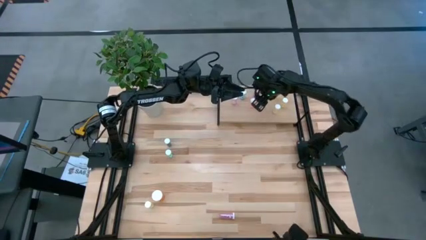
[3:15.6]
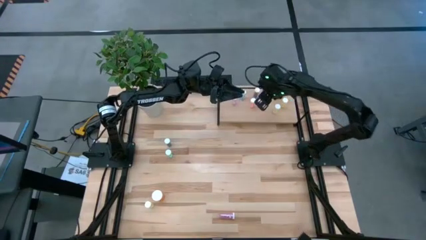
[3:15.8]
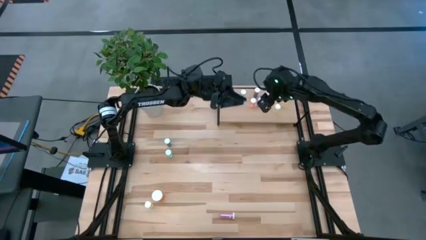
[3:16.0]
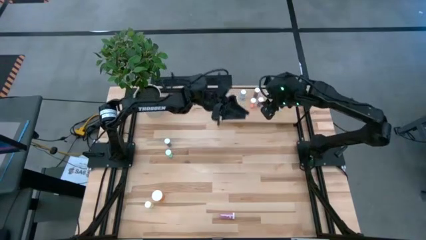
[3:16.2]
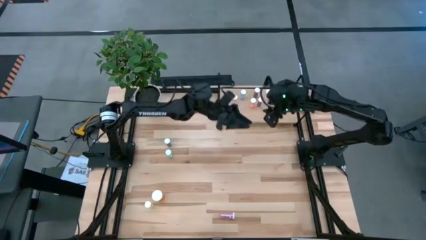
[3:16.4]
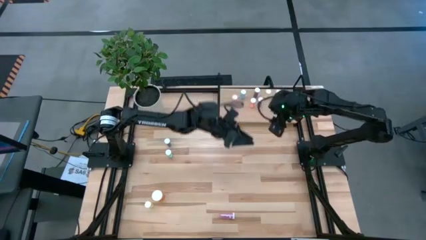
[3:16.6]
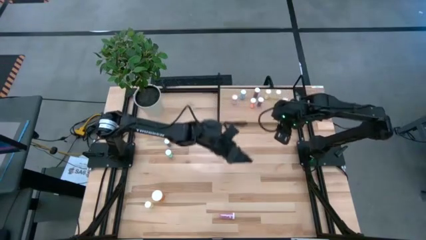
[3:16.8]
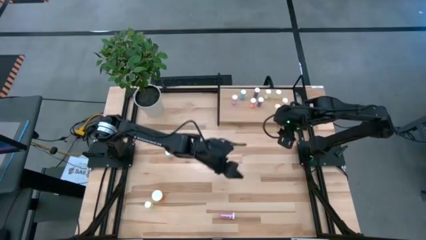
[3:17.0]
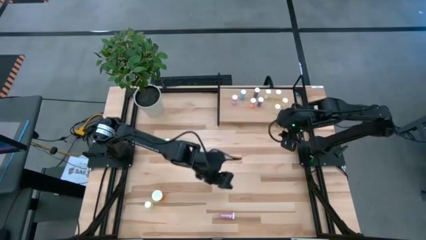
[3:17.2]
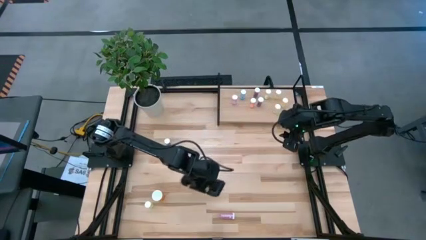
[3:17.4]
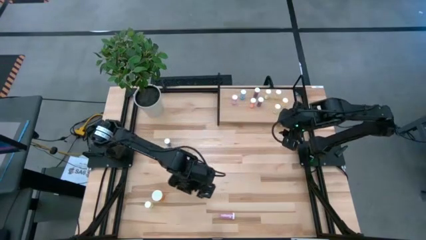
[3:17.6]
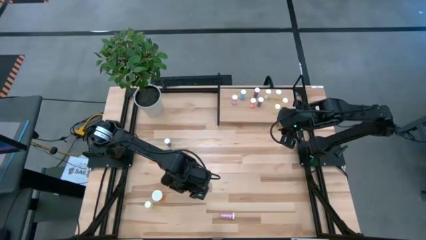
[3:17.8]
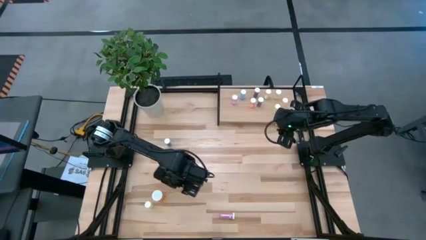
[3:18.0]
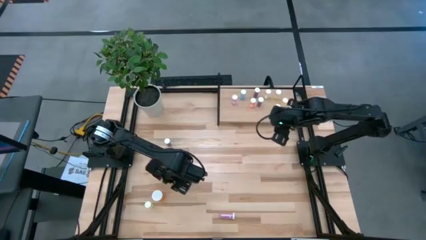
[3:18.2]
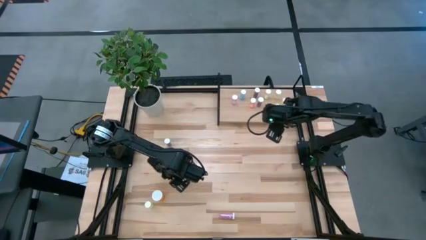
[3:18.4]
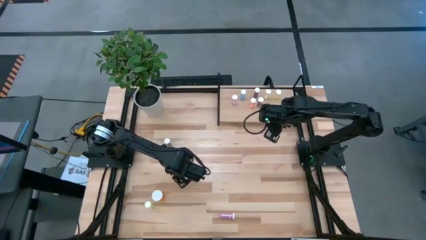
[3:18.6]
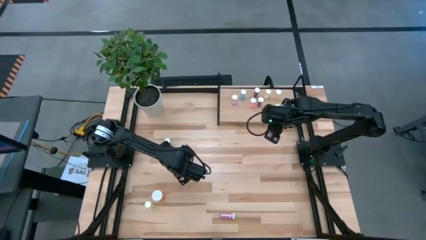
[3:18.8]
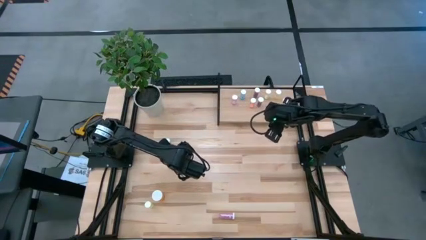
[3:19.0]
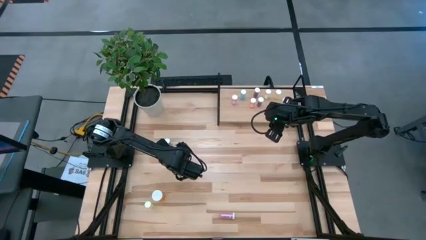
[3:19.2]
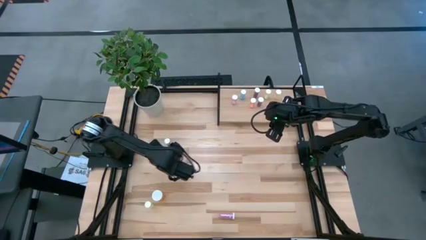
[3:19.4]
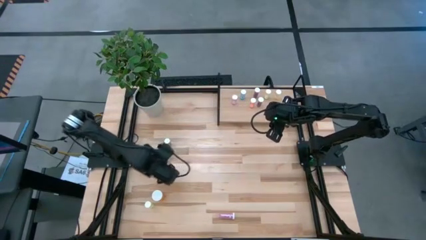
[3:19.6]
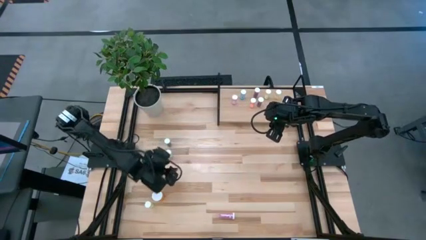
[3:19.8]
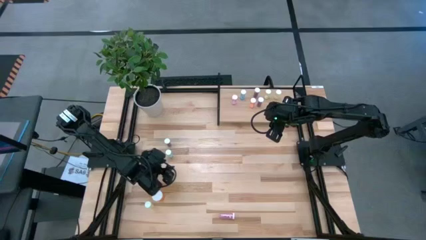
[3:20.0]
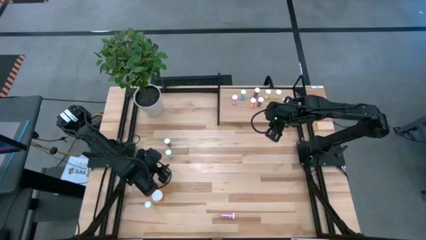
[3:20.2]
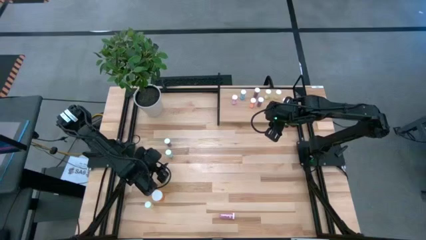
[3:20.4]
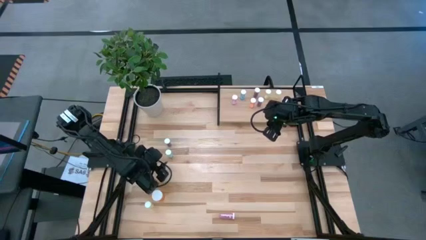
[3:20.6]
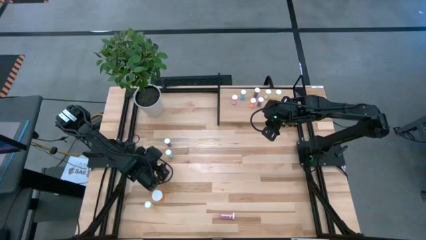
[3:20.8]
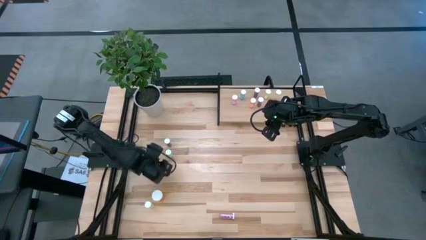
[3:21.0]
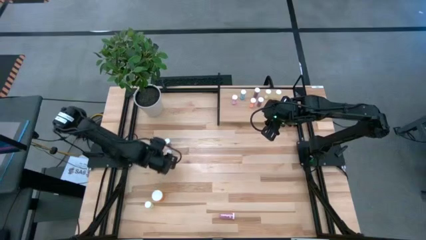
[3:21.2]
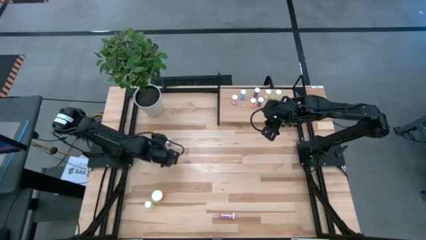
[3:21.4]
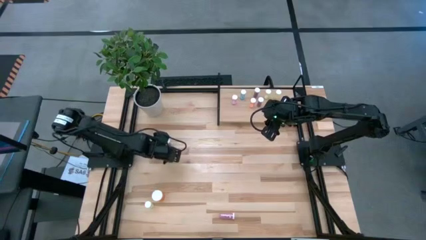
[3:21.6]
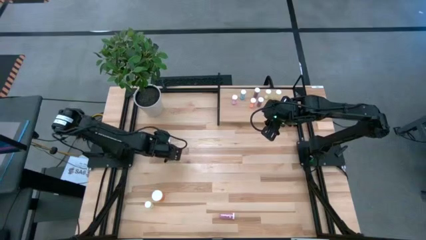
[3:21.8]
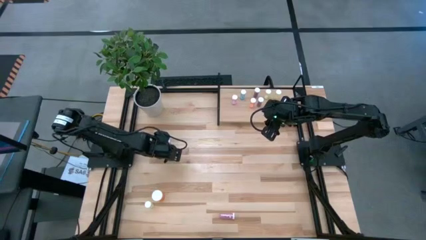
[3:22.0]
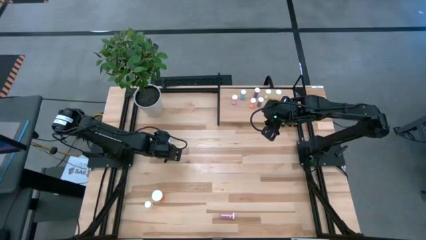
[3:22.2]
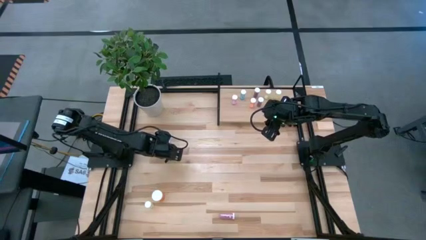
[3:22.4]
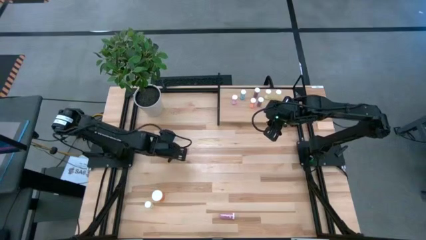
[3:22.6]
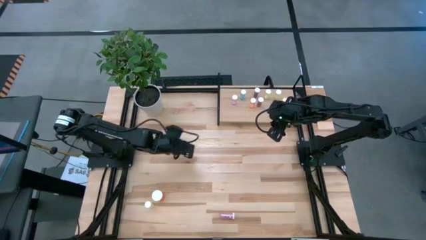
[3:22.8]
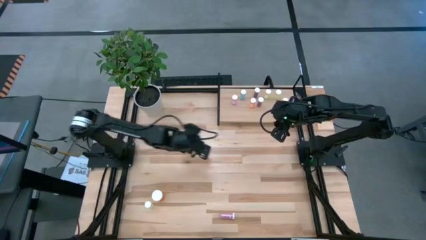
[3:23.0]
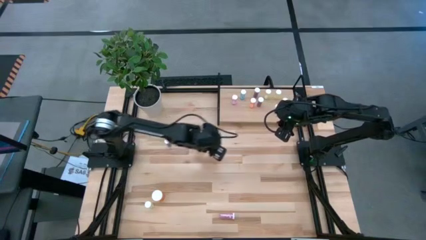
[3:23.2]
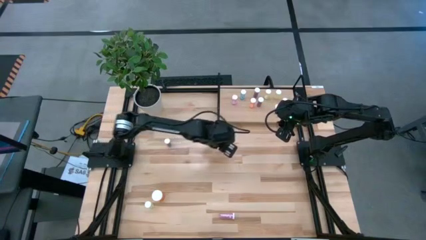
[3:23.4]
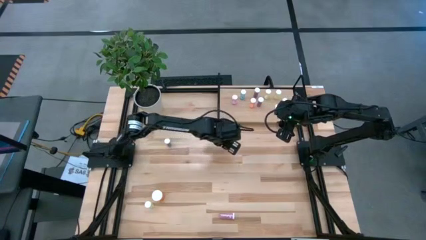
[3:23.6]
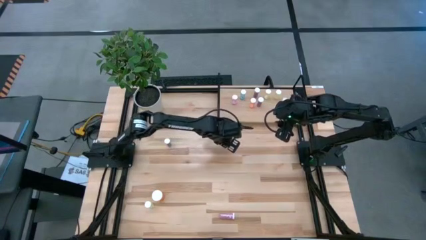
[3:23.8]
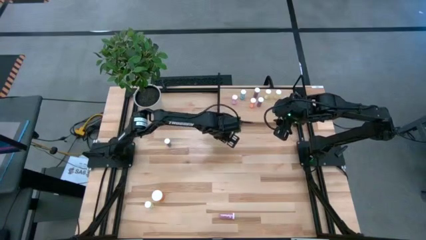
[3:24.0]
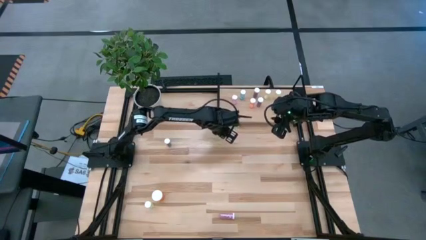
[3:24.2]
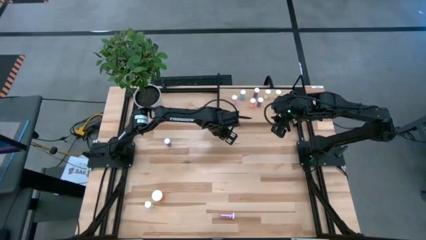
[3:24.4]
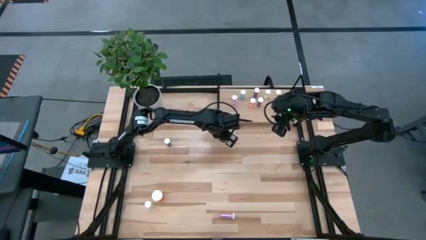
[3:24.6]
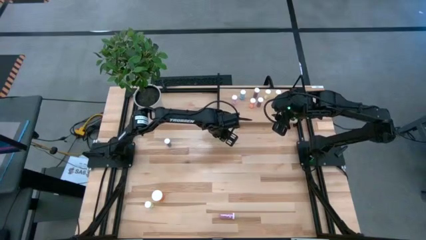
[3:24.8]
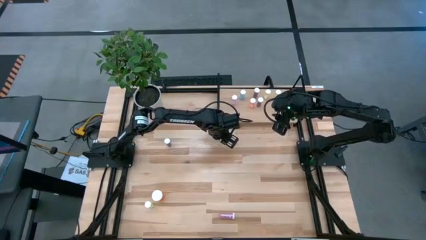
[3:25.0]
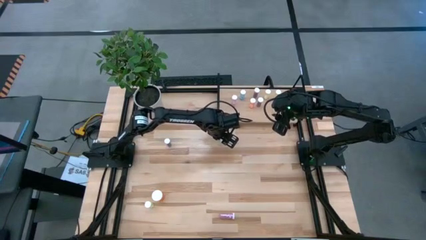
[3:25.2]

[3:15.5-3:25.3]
Task: Pick and place medicine bottles onto shelf by color
Move the blue pill bottle to the center of the table

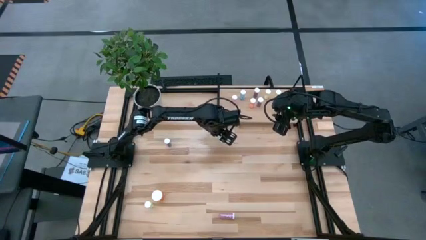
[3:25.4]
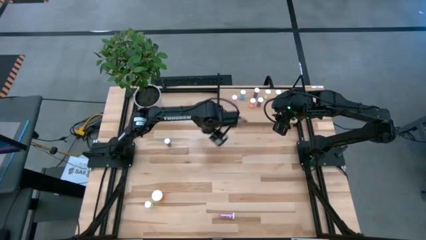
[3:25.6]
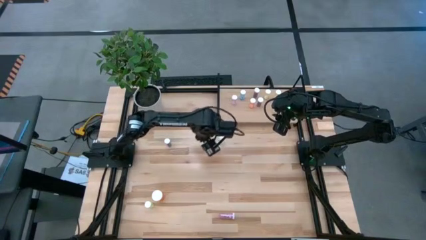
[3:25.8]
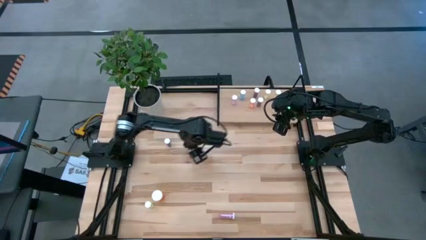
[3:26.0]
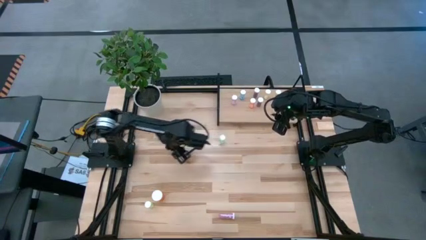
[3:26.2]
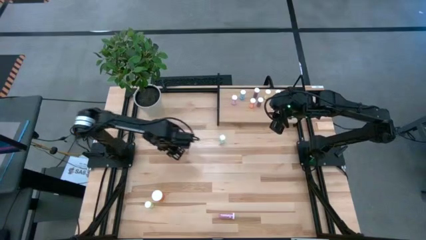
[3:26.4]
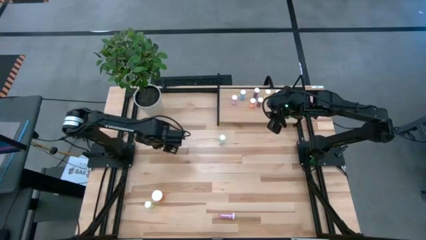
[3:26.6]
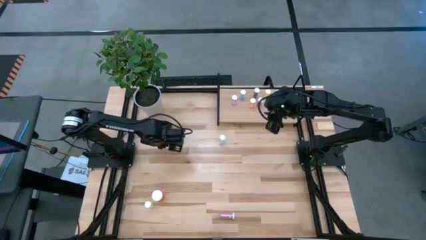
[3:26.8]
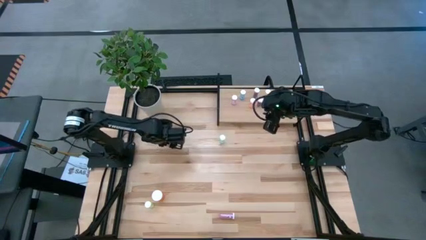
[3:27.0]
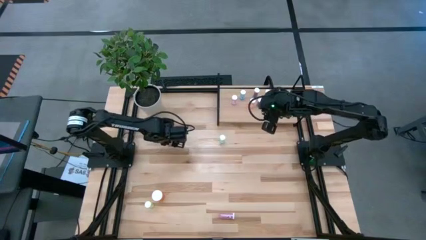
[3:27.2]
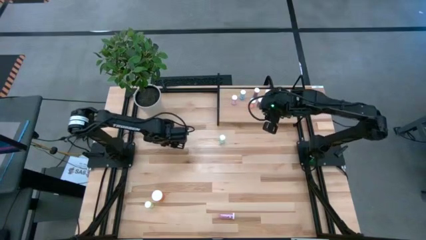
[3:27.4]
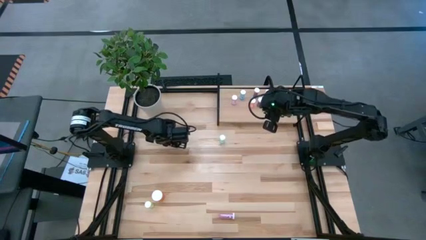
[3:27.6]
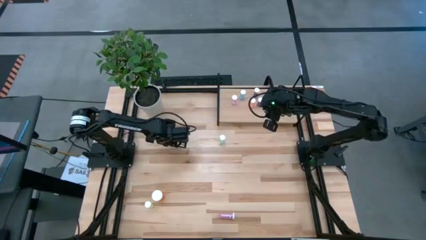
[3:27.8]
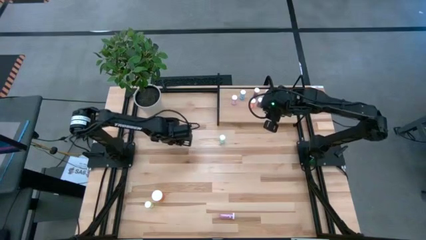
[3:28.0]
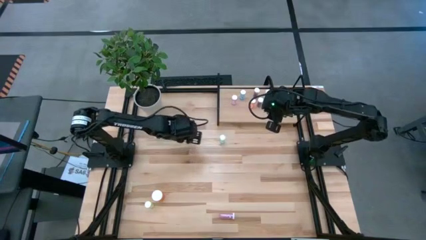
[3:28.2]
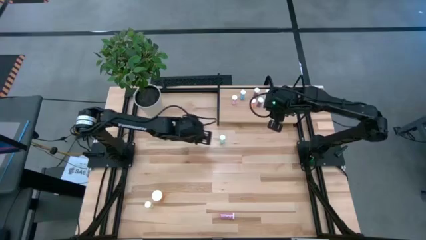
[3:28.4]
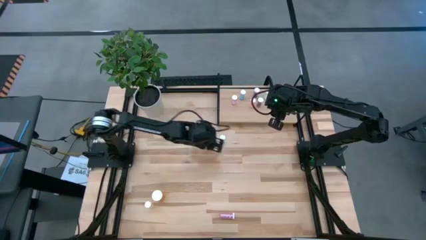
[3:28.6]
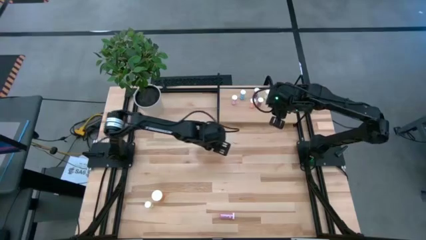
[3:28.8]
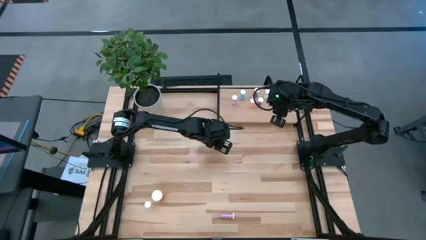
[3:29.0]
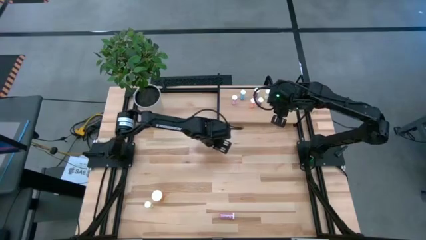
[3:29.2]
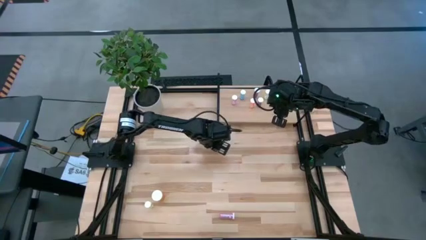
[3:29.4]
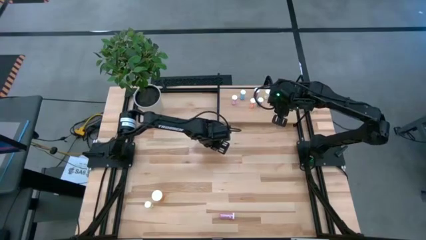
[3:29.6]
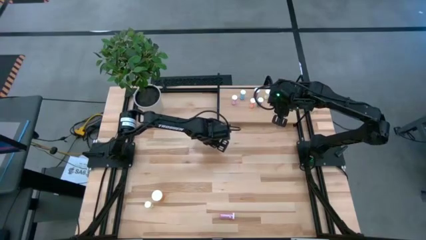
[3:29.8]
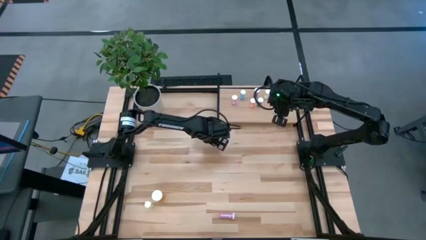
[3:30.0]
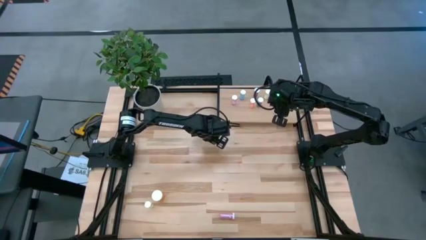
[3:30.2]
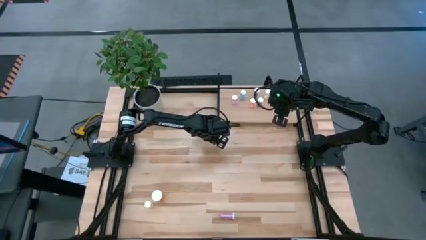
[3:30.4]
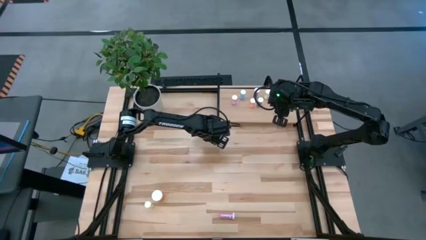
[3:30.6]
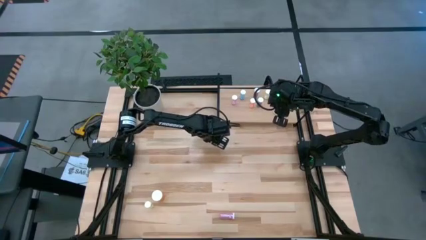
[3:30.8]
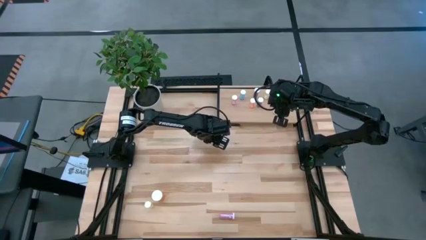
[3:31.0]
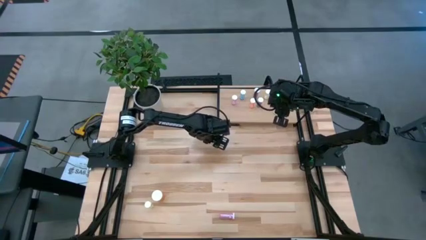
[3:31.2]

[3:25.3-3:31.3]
Move the blue pill bottle to the center of the table
